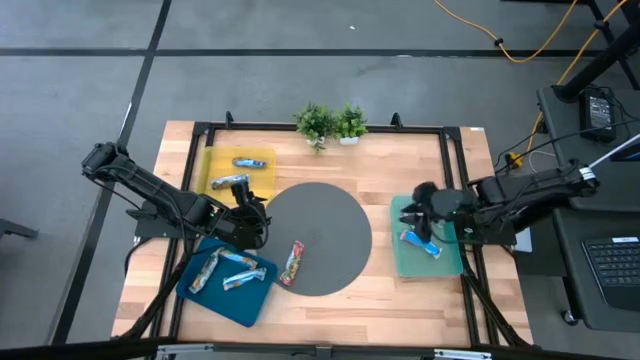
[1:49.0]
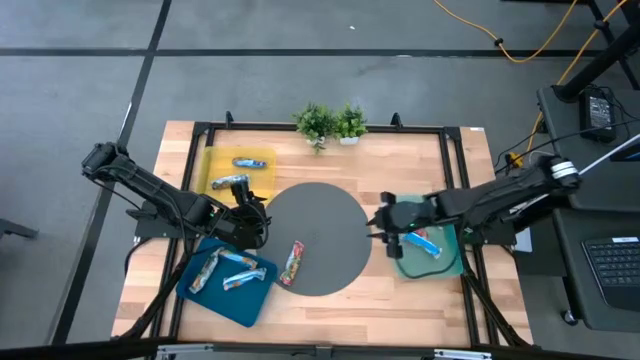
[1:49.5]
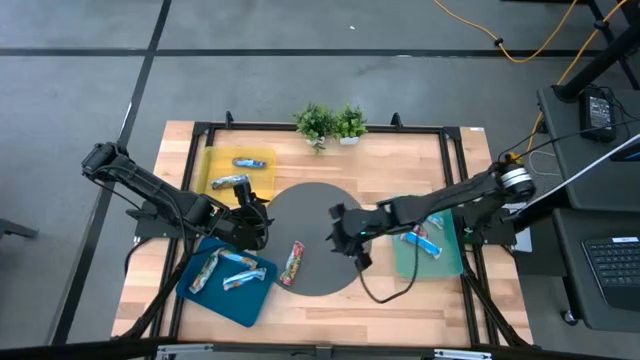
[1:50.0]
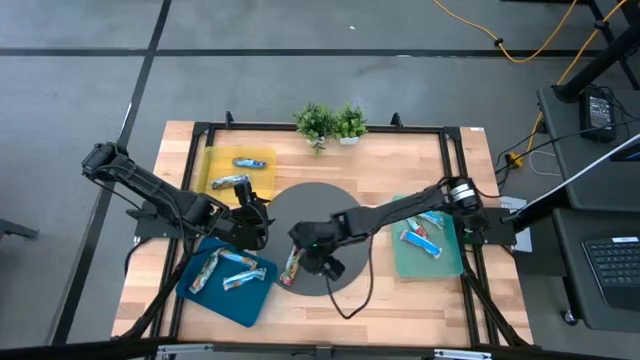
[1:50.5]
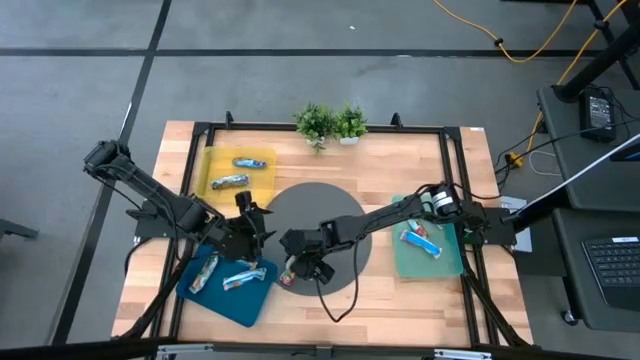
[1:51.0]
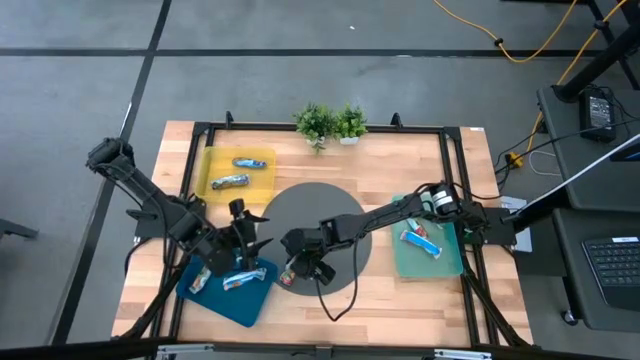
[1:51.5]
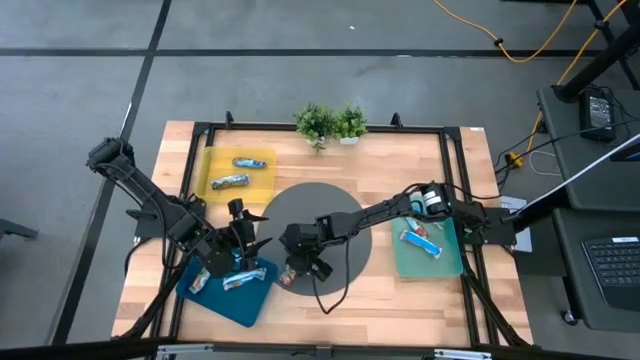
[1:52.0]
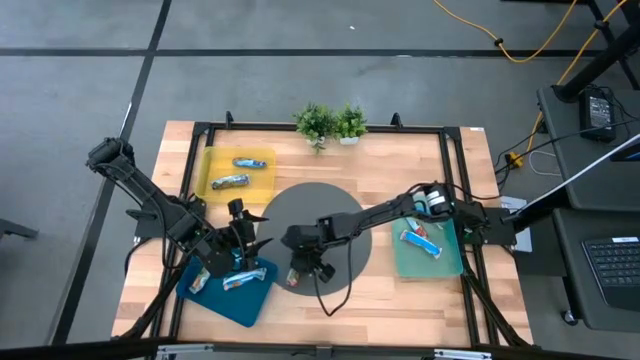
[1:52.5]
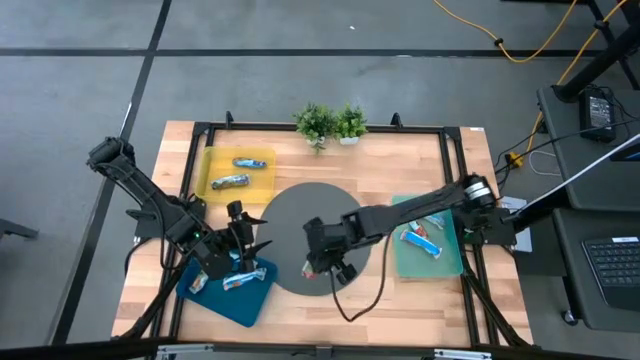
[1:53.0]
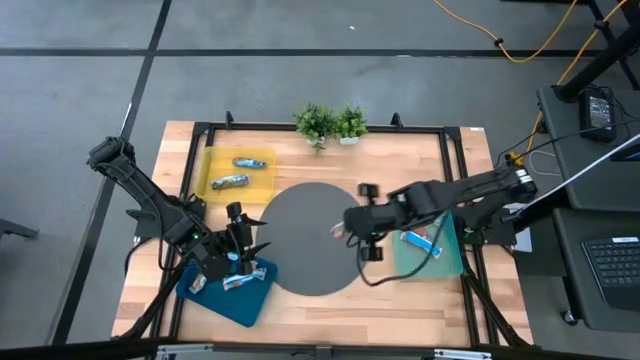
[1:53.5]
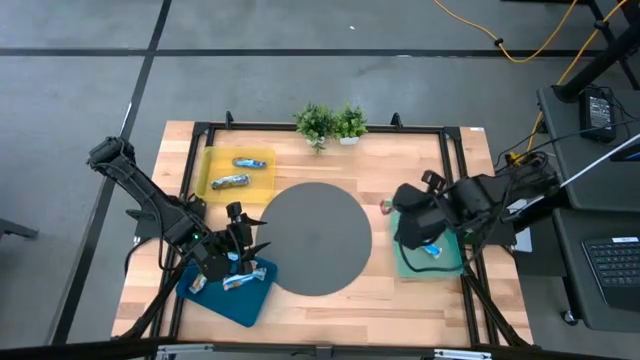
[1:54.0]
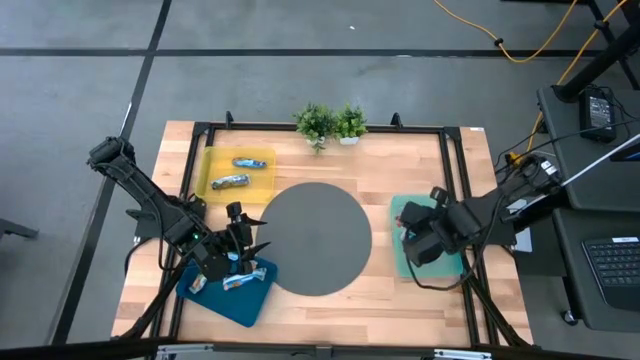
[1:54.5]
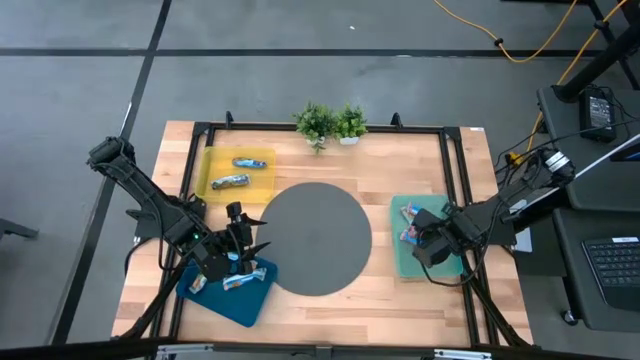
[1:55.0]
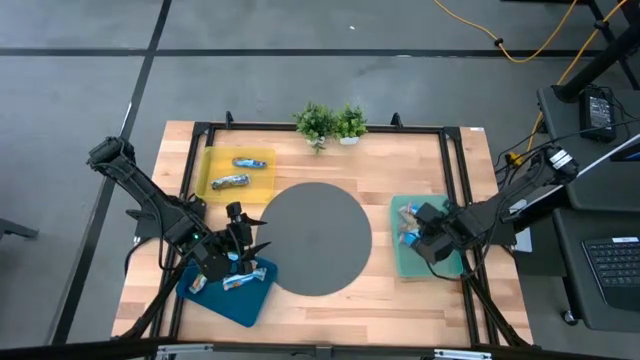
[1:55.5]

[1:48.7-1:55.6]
Task: Pick and place Granola Bars by type
Put the red granola bar into the green bin

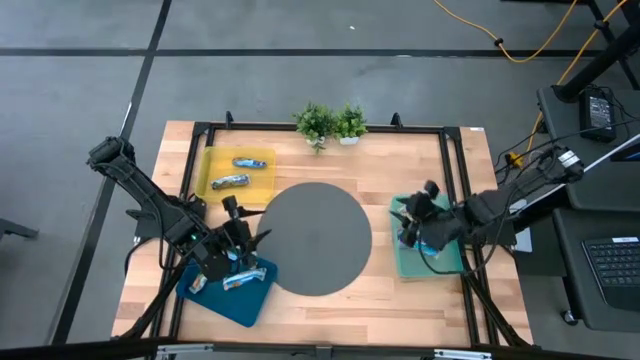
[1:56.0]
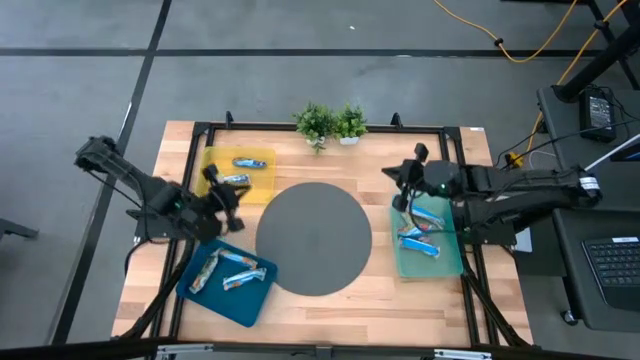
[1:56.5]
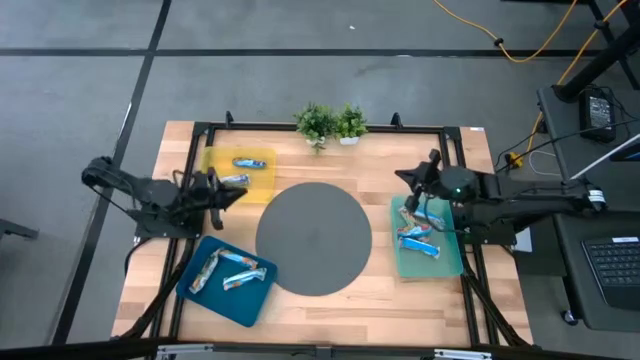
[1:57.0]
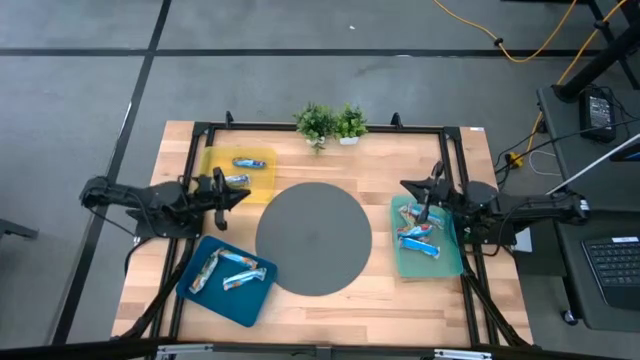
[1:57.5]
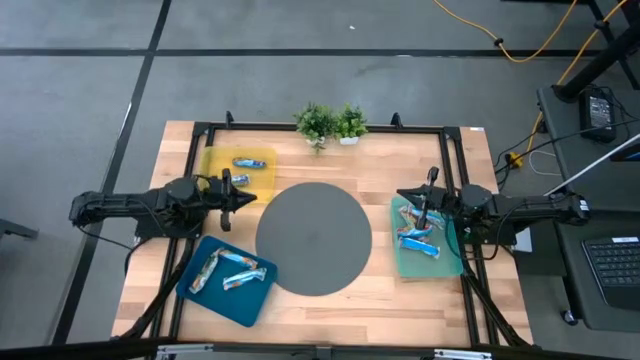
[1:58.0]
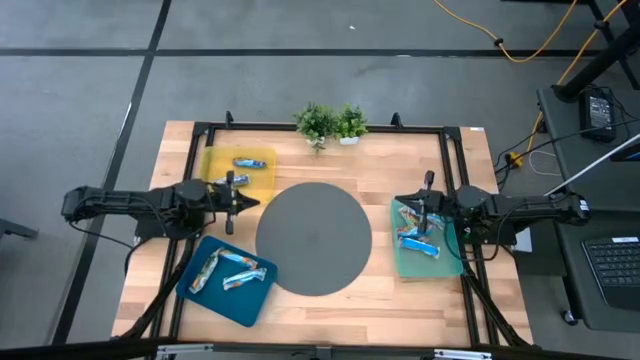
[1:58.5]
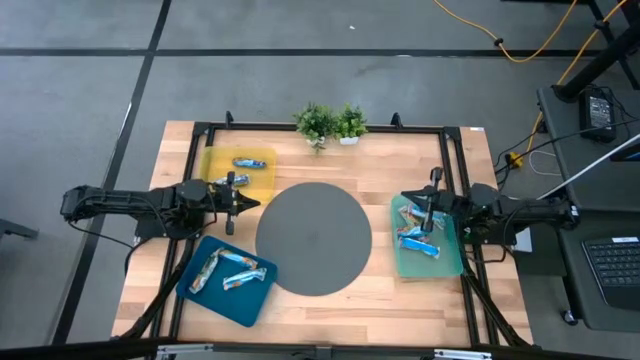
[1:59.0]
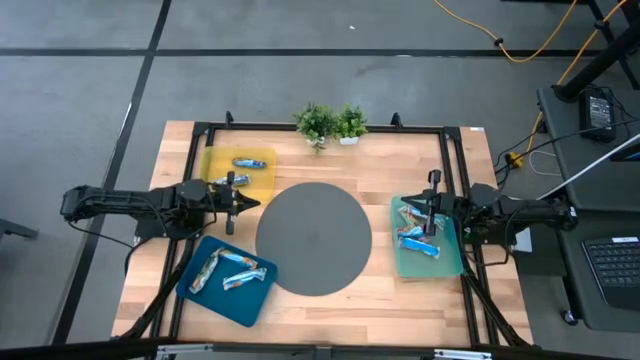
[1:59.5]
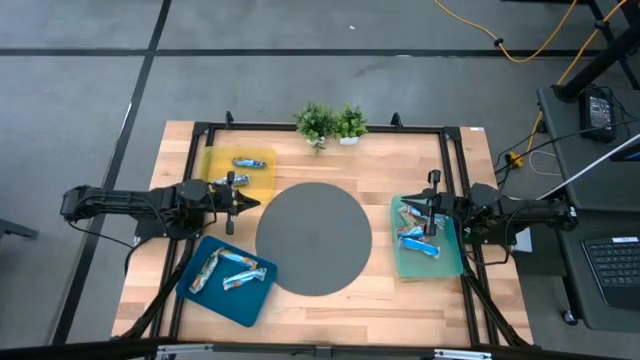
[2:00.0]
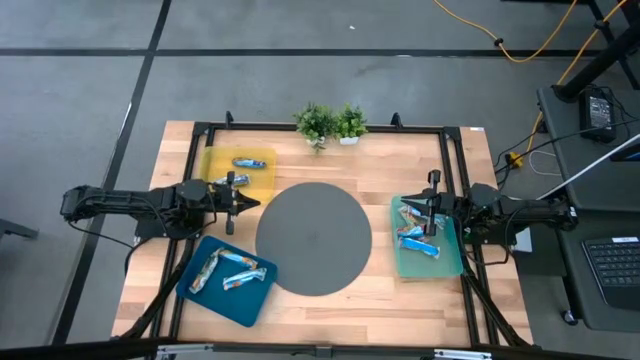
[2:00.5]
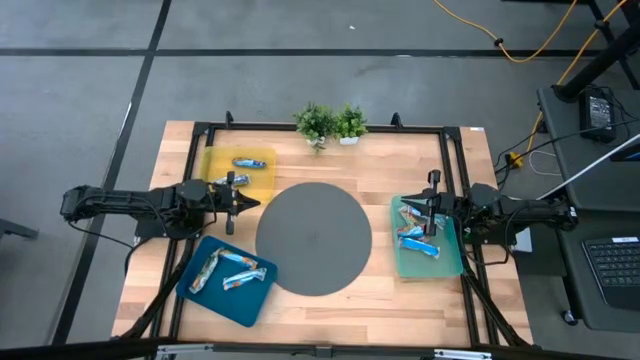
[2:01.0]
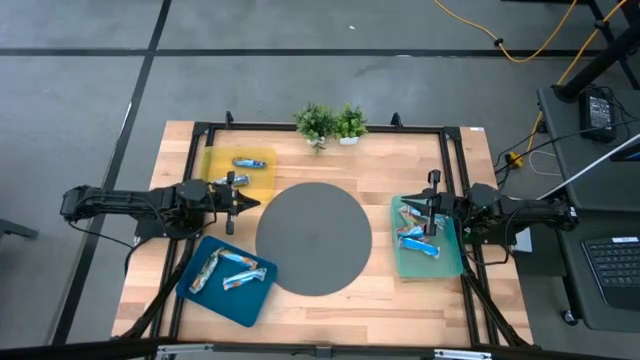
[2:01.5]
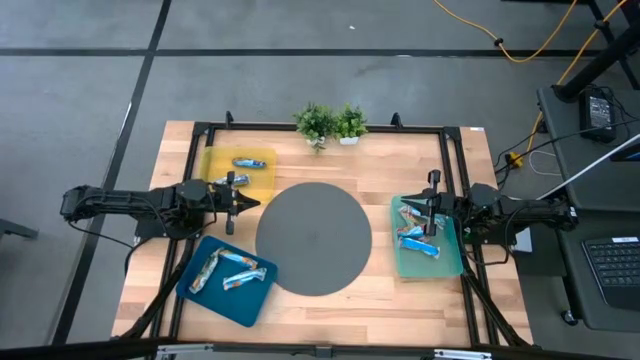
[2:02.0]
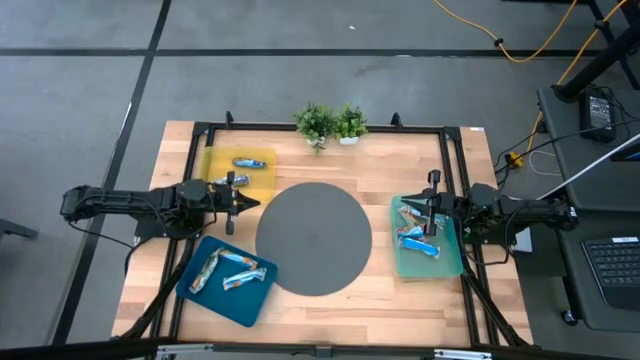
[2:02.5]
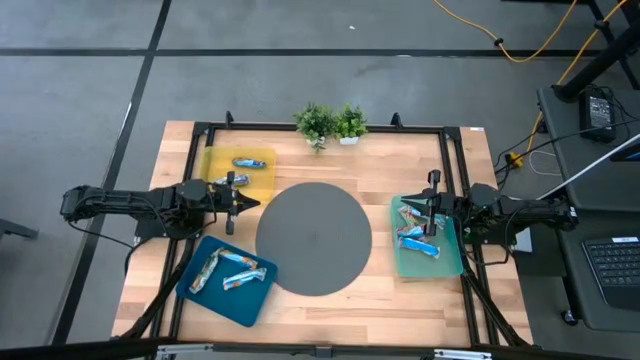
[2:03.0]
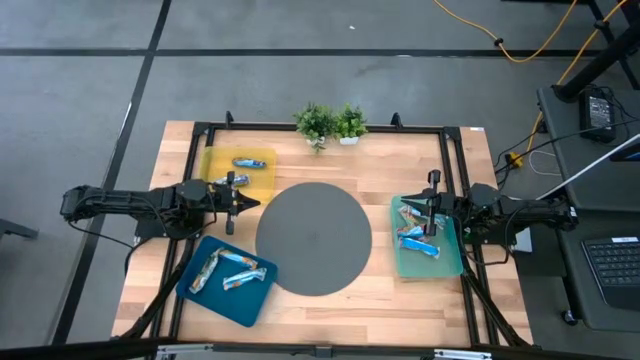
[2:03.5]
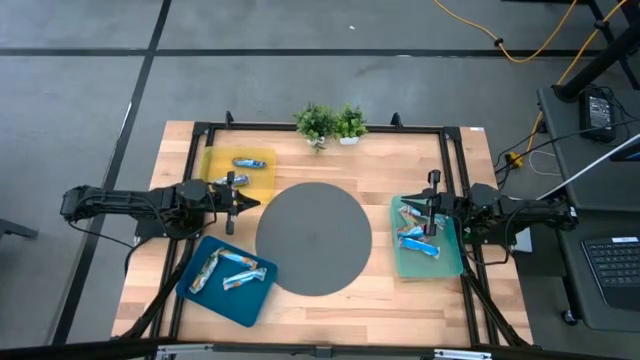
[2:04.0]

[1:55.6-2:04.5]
Return to Home Position

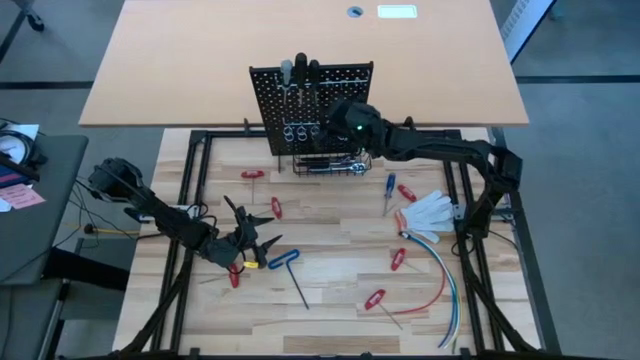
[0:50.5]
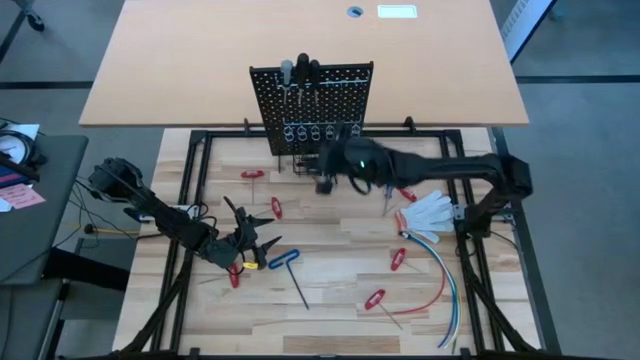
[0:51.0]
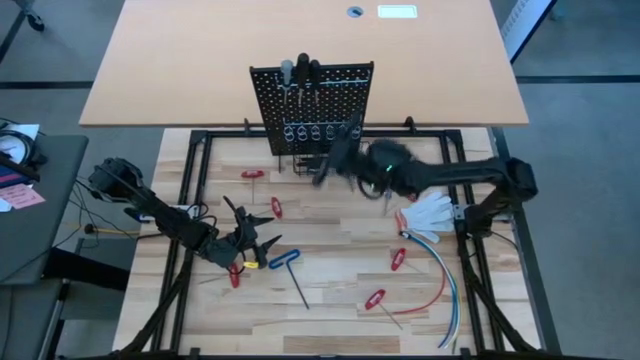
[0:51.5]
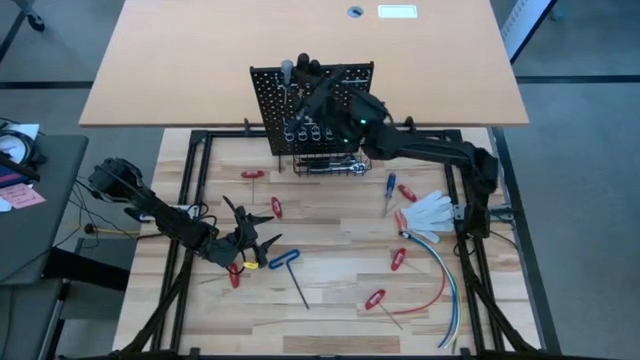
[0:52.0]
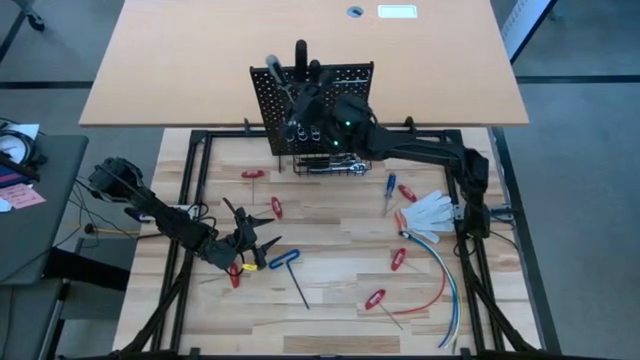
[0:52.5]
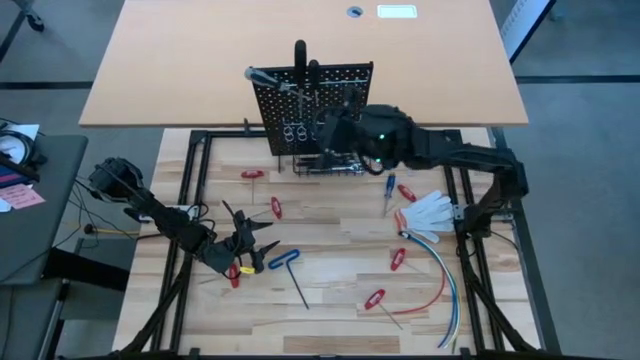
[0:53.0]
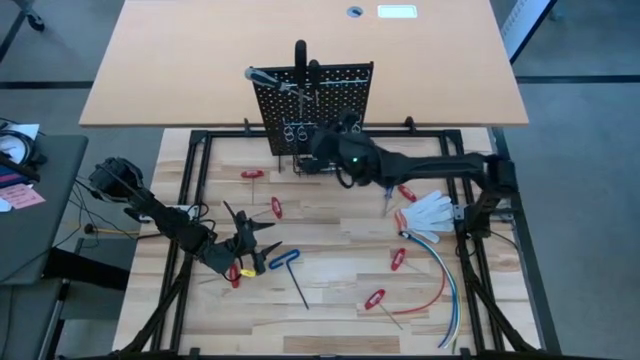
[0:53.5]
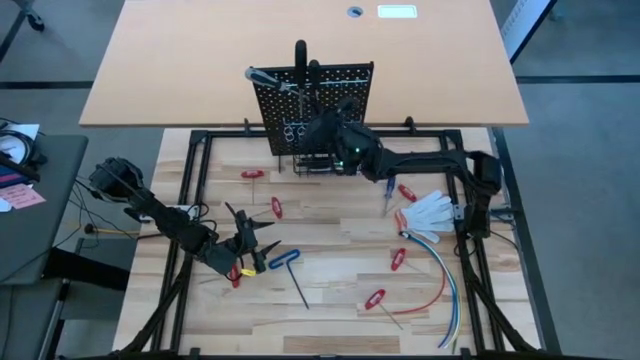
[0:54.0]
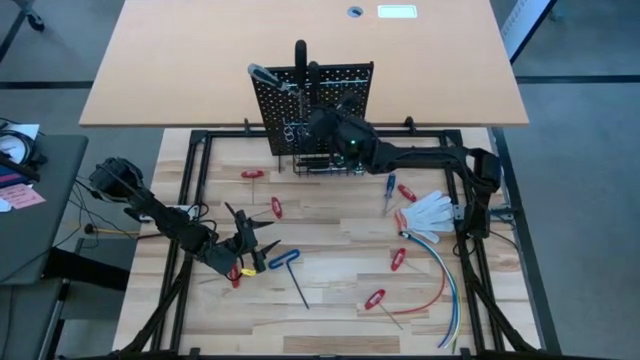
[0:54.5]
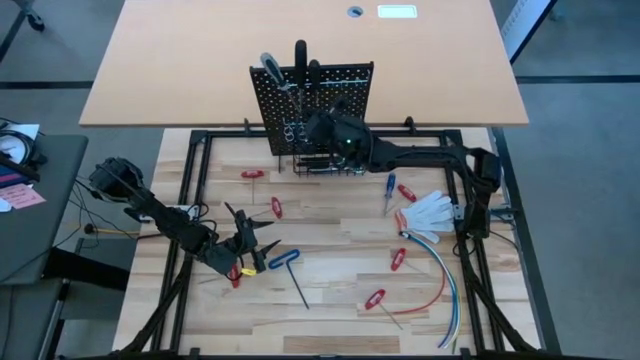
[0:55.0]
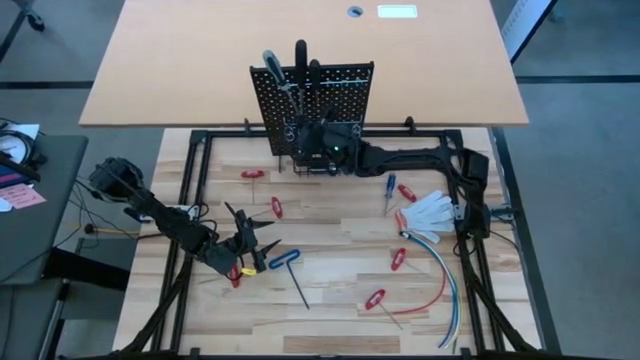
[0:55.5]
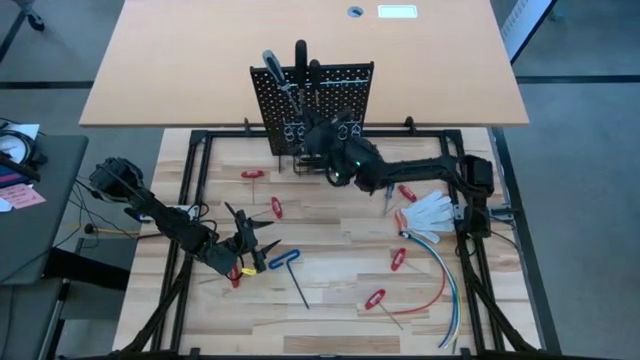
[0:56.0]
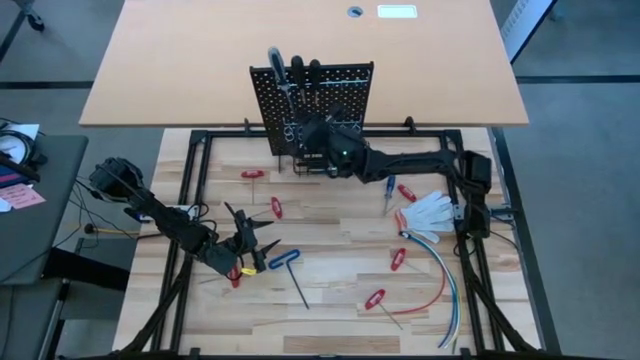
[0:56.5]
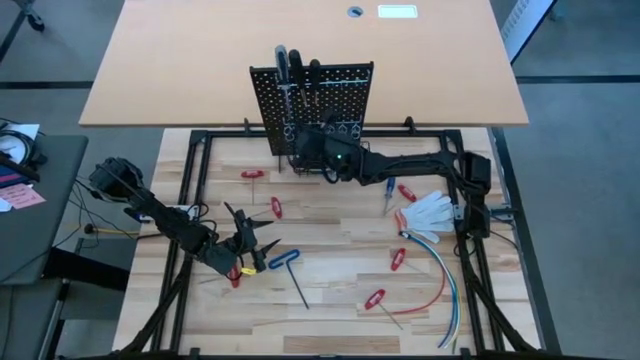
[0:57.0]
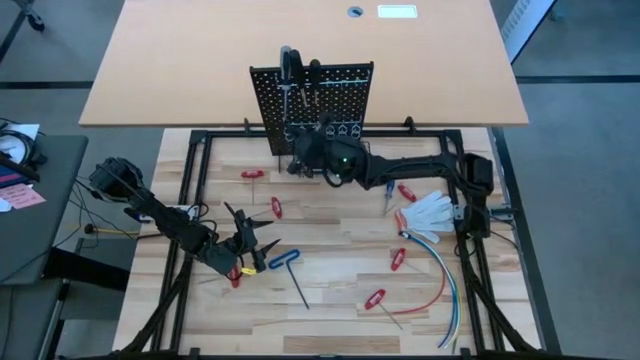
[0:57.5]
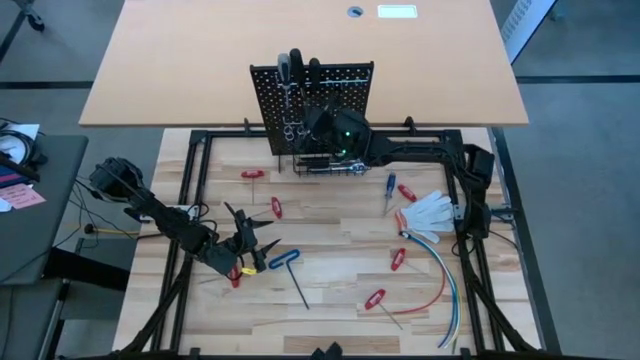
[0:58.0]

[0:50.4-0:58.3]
Task: Hang tools onto peg board
Adjust the screwdrivers on the pegboard
